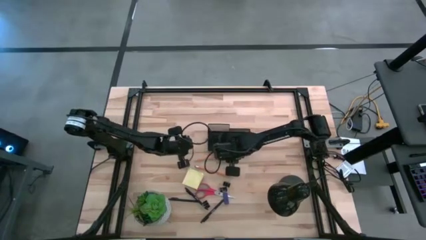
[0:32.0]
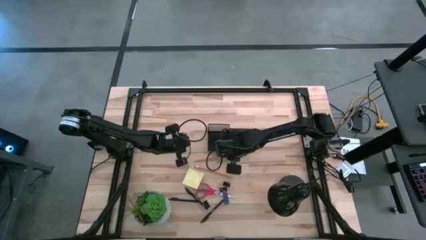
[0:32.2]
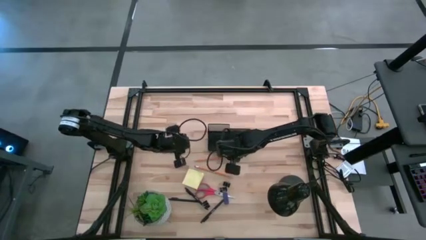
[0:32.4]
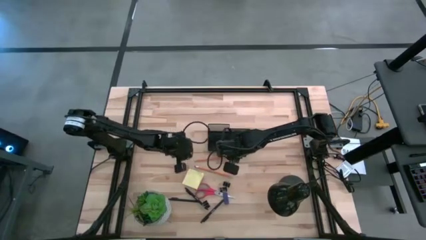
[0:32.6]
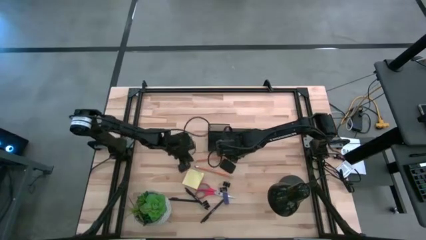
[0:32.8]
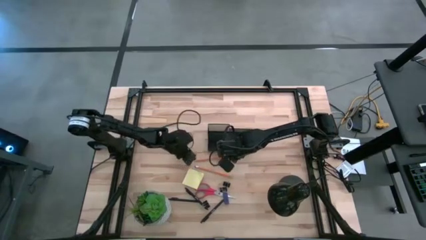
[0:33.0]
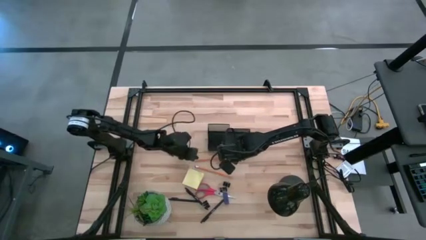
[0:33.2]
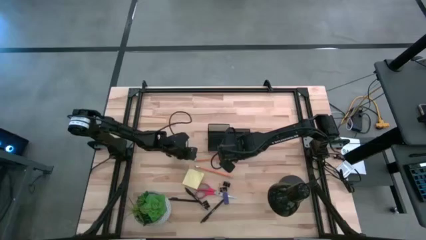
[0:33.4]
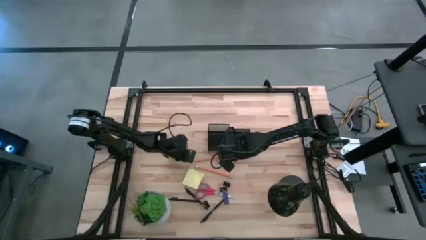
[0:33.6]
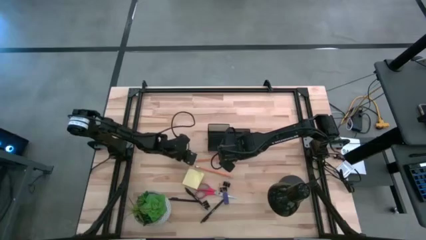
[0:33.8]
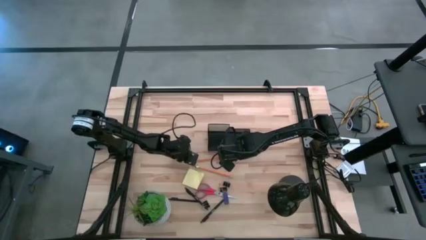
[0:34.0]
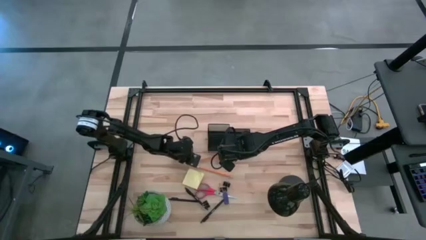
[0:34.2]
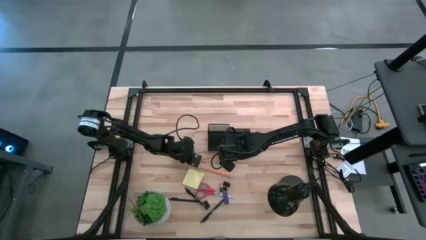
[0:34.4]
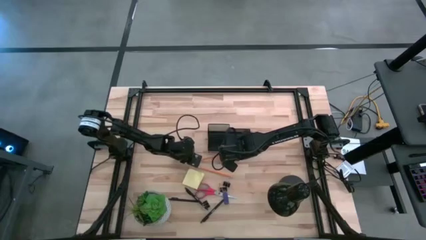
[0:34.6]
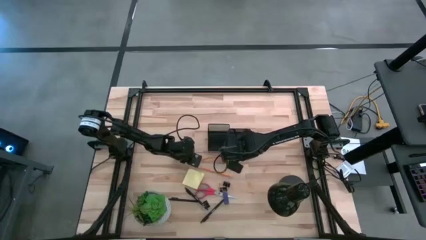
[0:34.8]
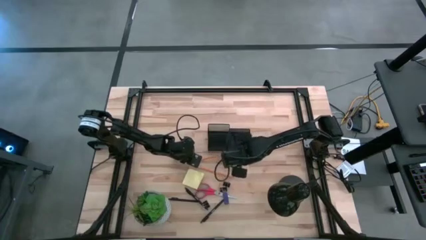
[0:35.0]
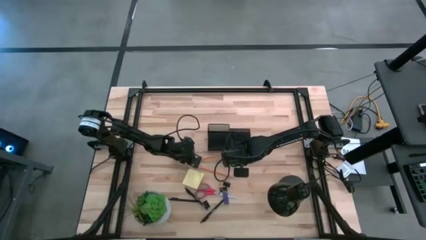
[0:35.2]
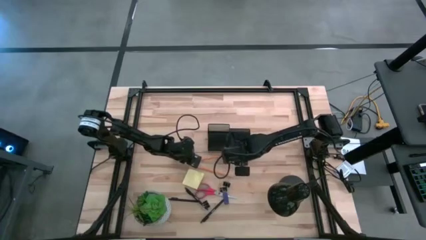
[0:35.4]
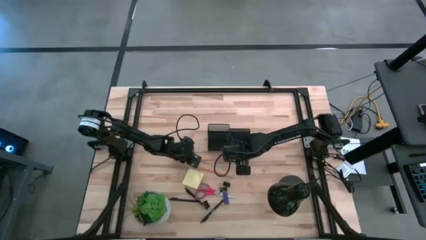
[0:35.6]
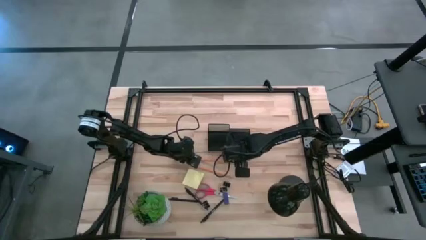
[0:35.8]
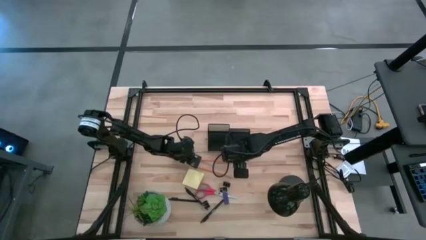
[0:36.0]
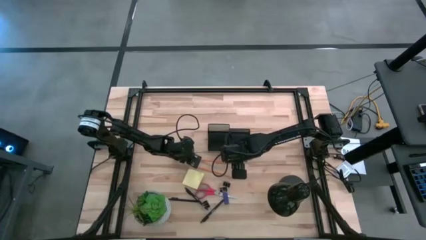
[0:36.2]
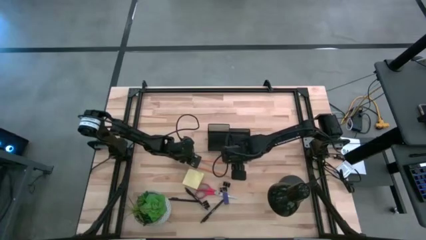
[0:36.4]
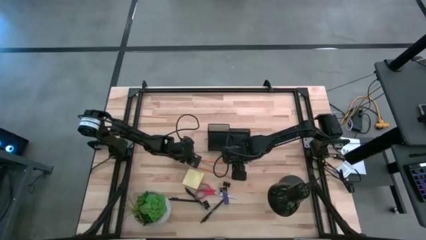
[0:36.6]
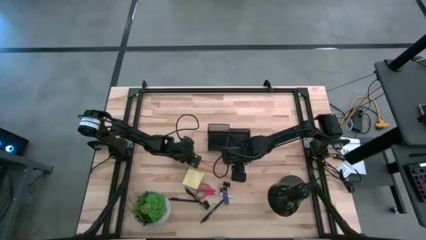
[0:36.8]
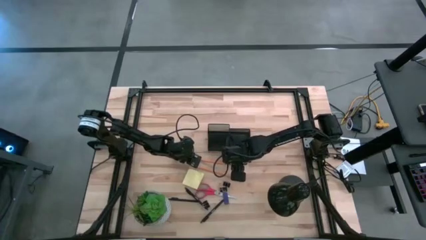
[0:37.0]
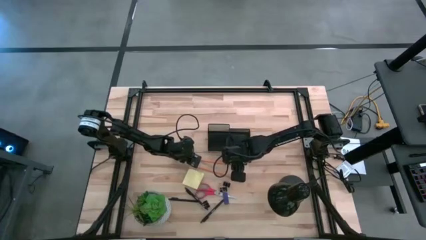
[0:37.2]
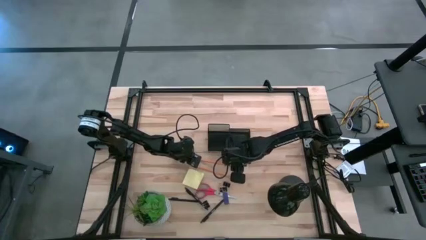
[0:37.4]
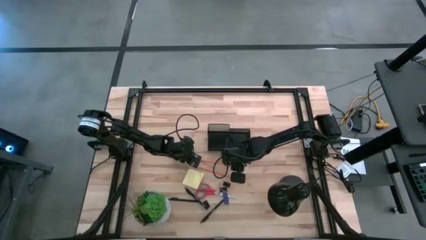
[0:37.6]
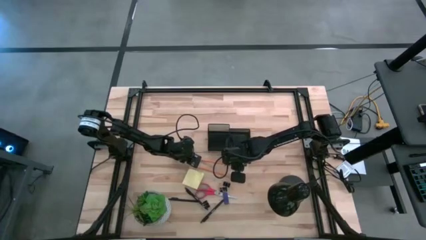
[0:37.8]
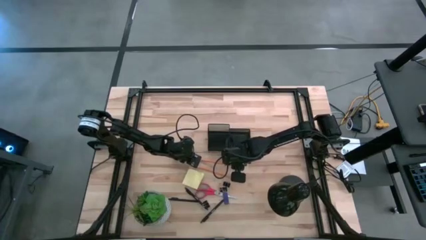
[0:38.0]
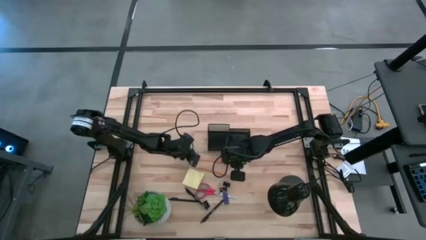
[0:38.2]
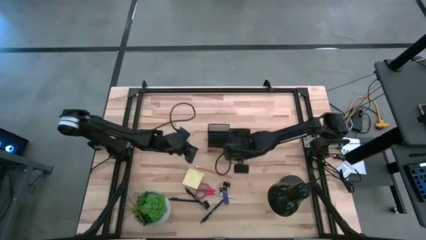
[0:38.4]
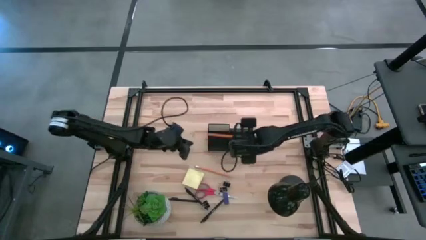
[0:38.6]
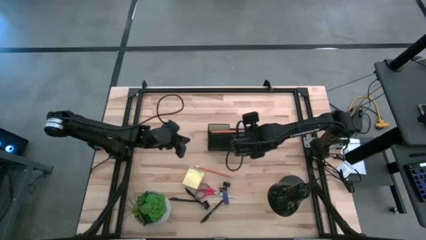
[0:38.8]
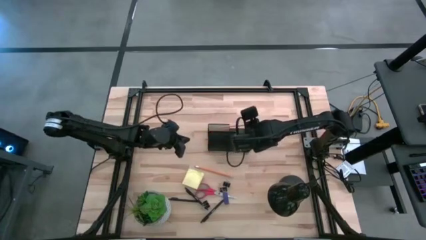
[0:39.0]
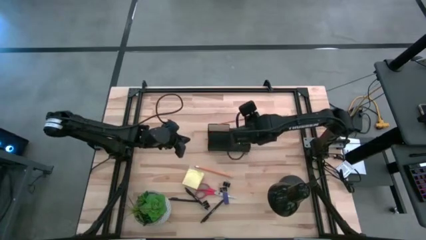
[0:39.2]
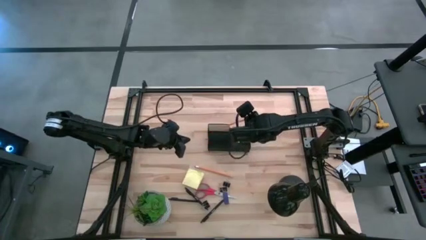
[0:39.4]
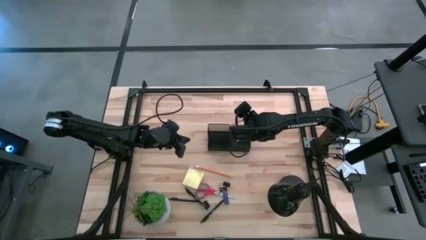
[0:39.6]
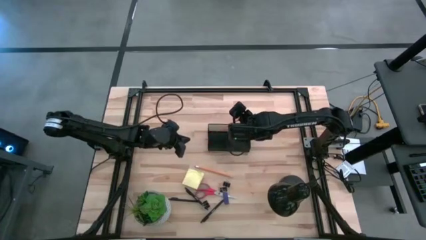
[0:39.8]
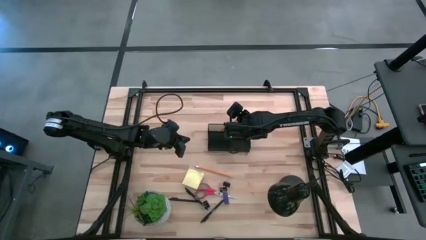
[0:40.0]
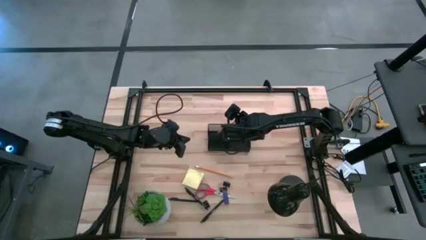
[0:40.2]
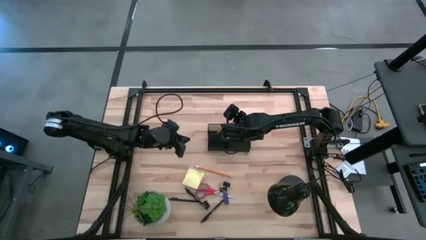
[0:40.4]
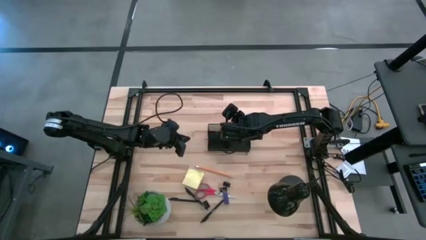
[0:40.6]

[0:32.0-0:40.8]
Task: Pick and place office supplies into organizer
Put the top orange pencil into the desk organizer

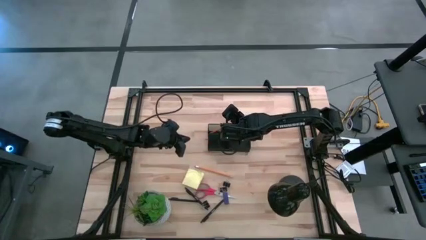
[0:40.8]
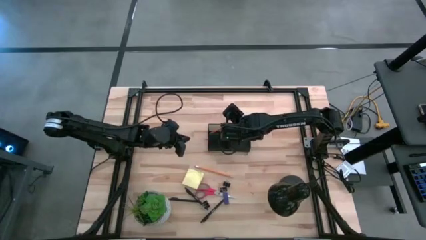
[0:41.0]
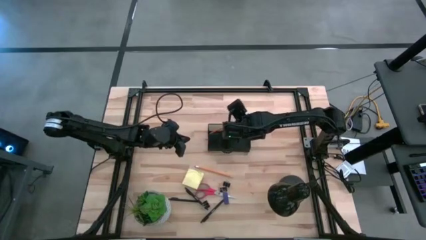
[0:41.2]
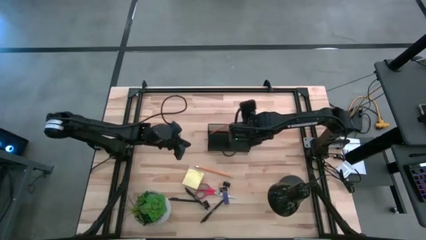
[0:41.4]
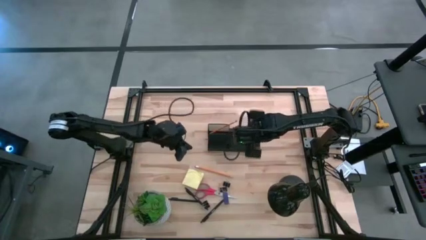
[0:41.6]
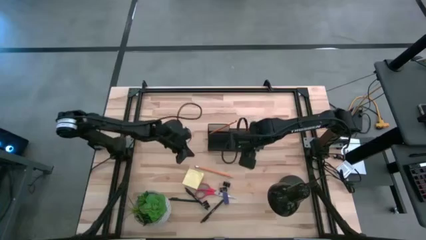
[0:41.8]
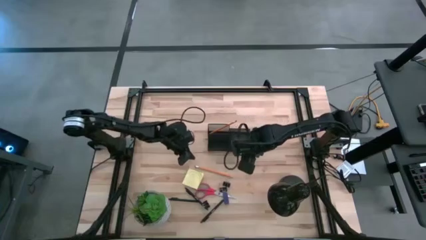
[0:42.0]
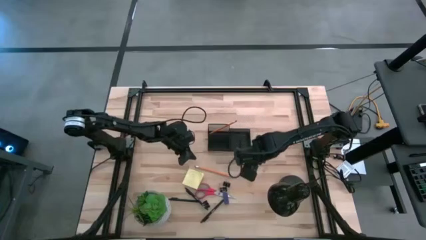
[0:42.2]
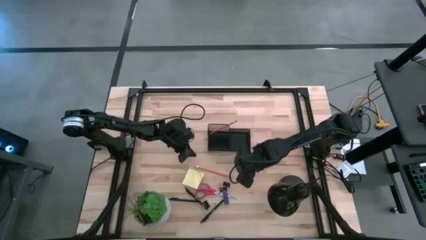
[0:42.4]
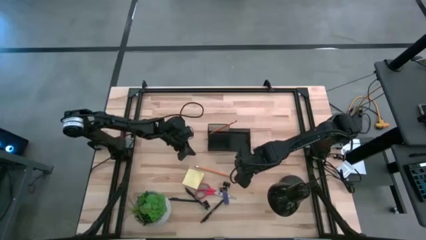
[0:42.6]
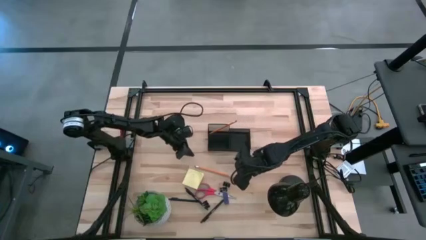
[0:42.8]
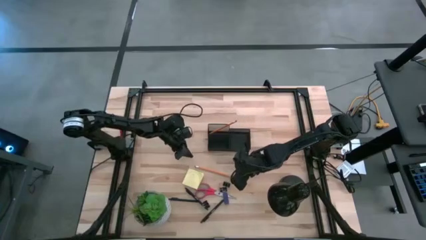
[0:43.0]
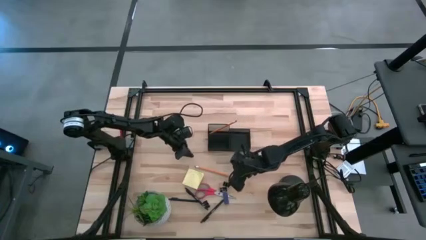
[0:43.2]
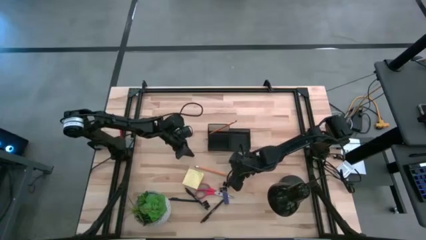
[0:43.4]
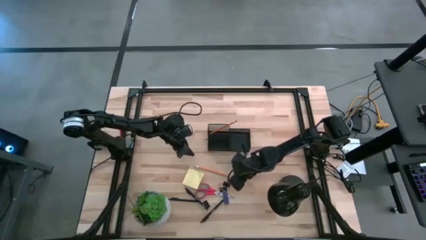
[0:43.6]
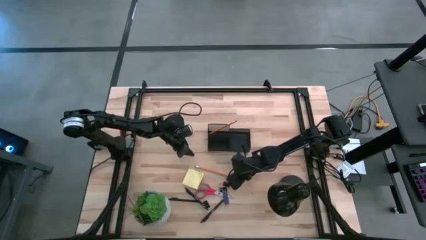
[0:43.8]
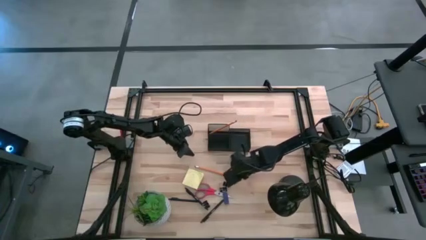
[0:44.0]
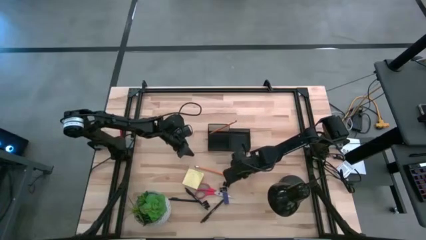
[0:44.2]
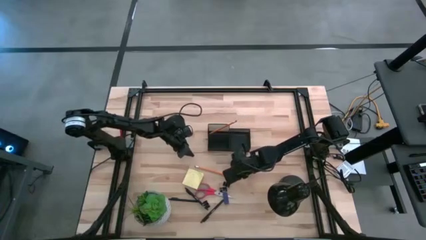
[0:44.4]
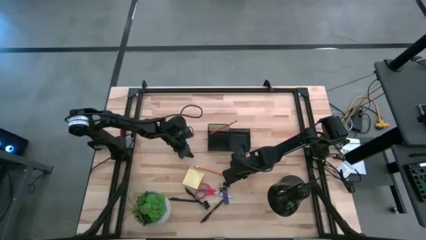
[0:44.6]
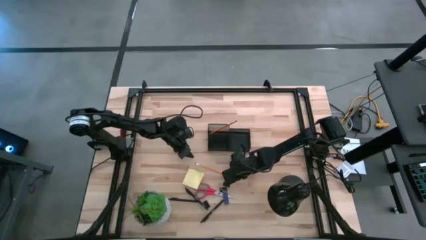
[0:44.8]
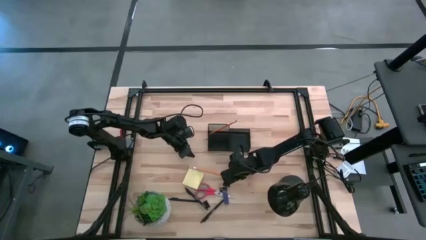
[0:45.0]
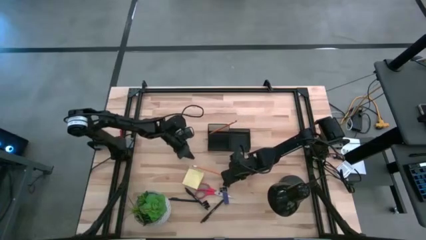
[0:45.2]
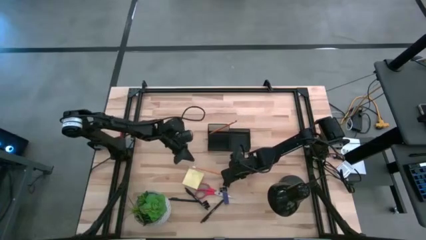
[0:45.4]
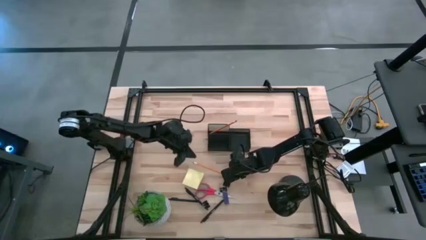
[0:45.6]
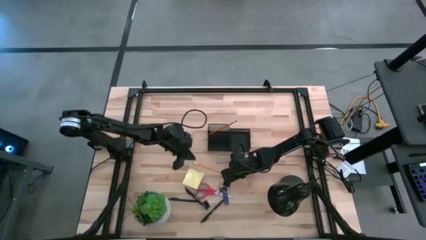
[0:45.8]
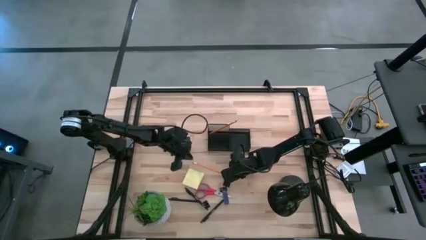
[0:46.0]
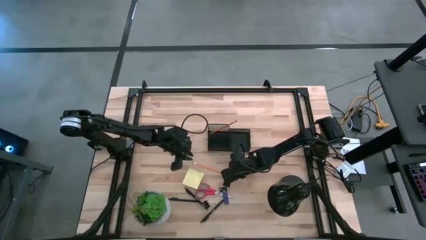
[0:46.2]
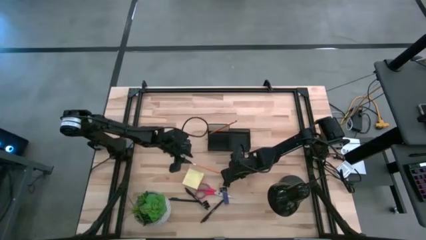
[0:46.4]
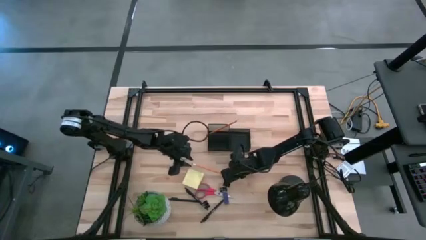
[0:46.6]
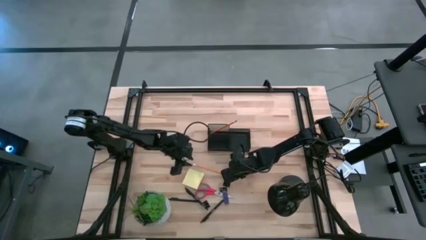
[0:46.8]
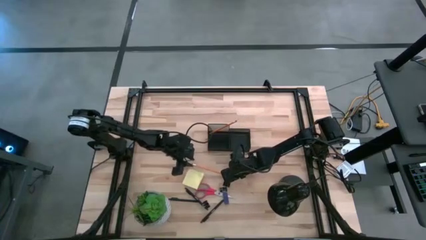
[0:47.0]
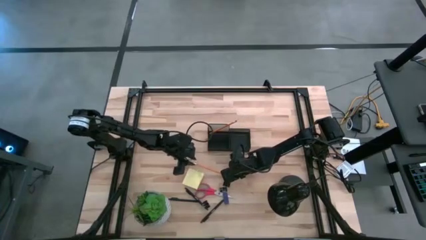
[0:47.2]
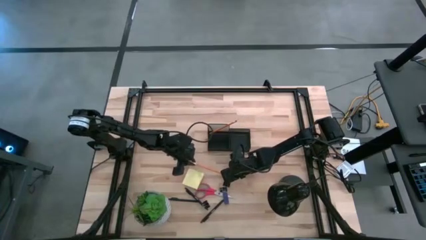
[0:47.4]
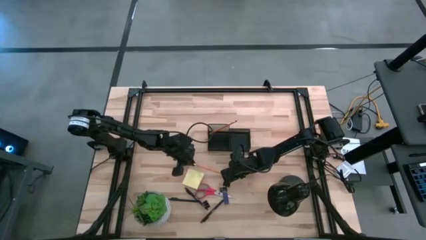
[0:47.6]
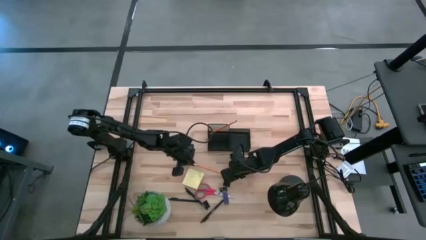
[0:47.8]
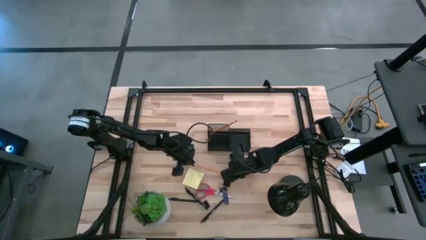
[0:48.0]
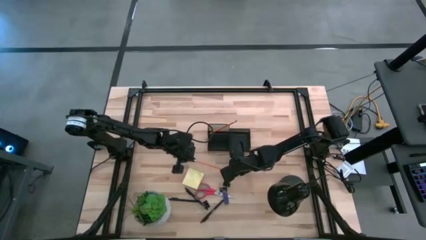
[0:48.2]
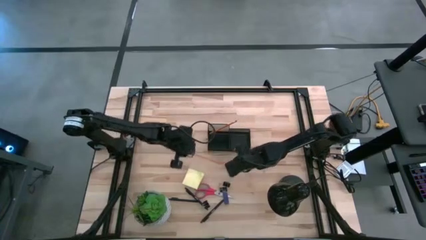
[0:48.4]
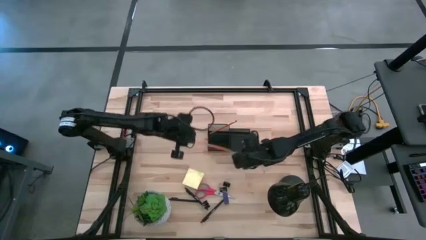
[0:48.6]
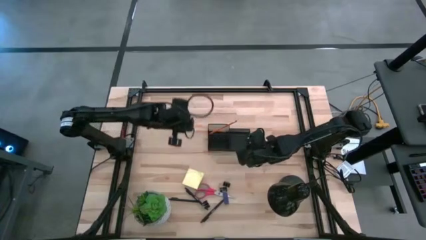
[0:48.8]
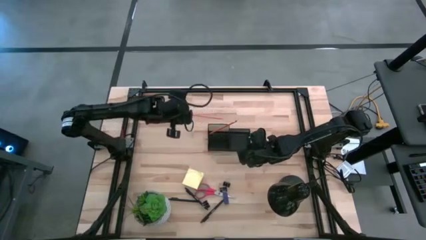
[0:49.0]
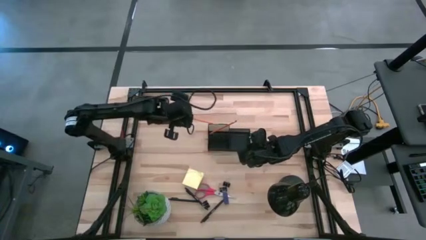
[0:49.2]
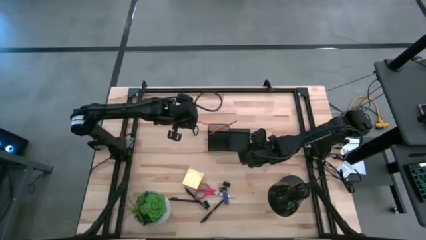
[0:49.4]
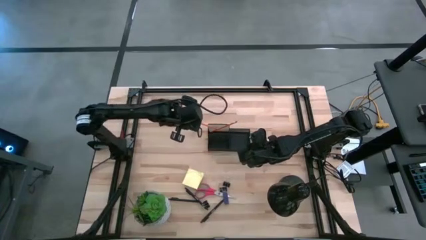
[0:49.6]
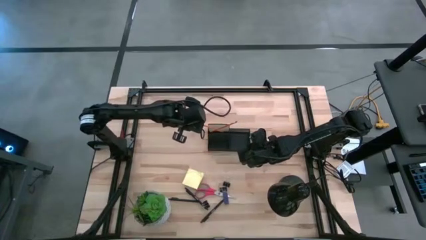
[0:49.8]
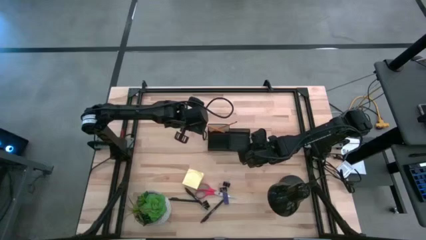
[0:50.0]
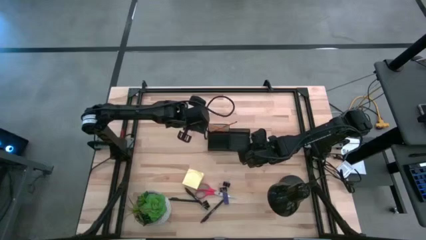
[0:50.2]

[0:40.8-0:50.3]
Put the orange pencil into the desk organizer
